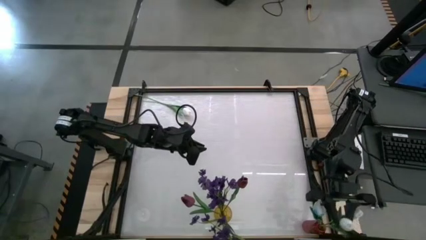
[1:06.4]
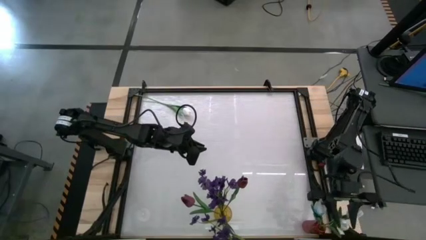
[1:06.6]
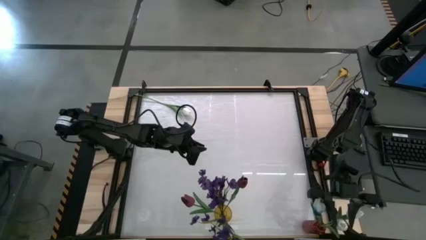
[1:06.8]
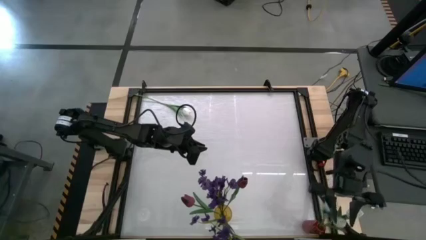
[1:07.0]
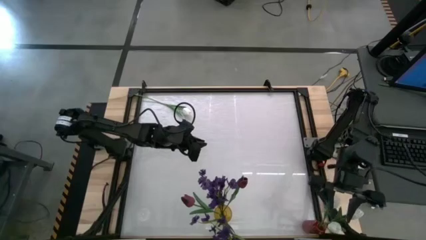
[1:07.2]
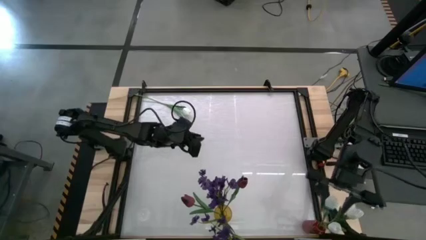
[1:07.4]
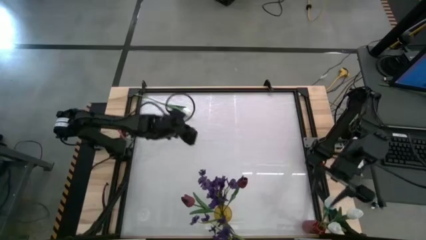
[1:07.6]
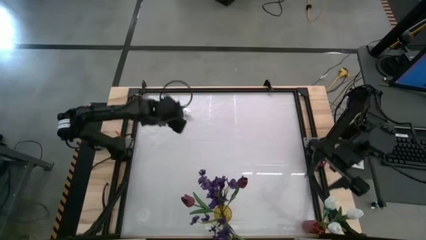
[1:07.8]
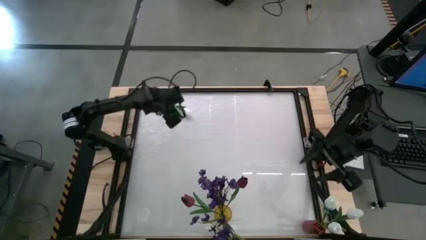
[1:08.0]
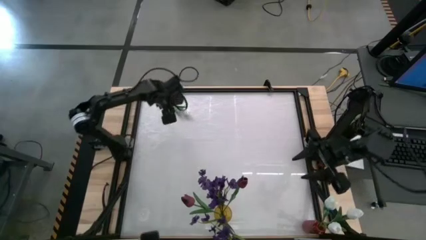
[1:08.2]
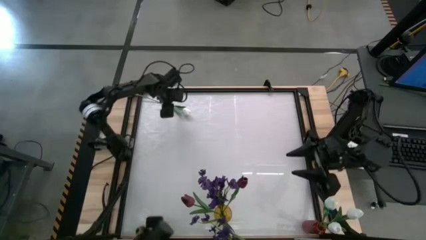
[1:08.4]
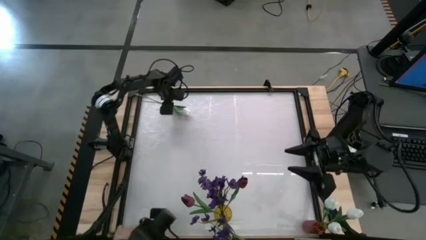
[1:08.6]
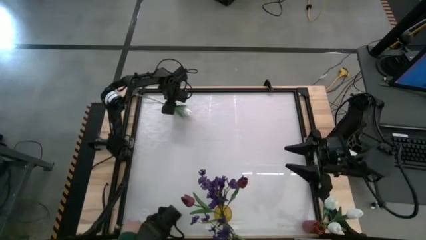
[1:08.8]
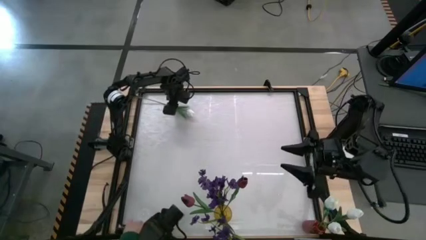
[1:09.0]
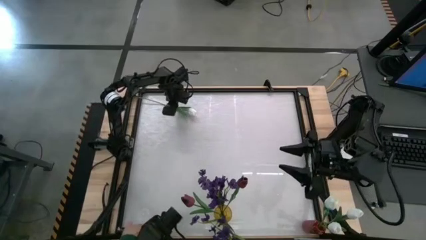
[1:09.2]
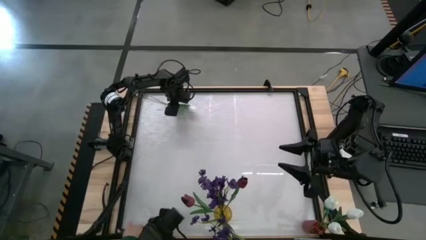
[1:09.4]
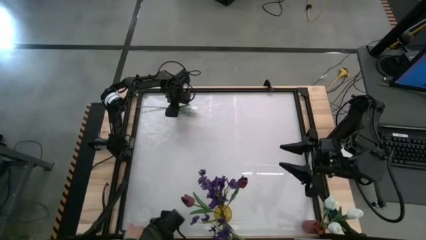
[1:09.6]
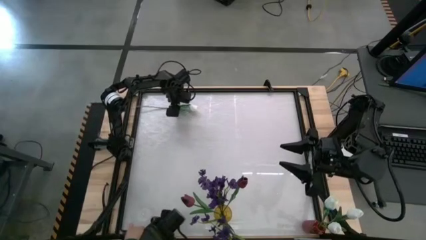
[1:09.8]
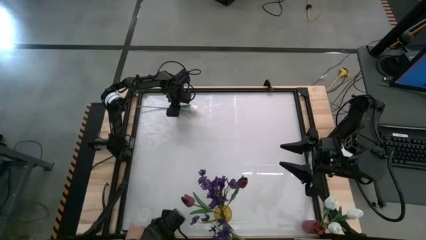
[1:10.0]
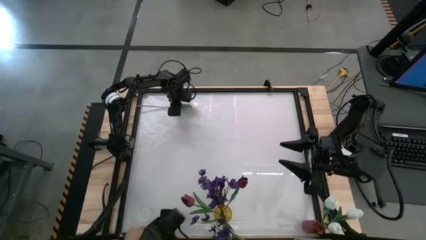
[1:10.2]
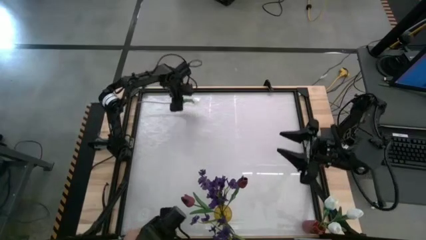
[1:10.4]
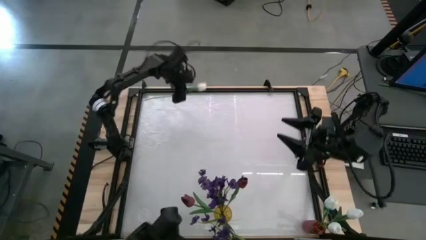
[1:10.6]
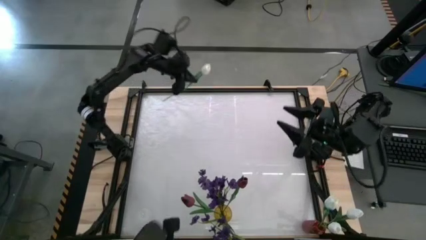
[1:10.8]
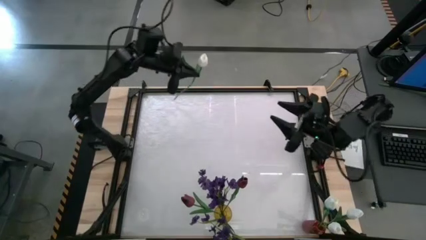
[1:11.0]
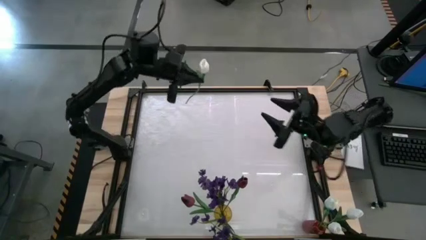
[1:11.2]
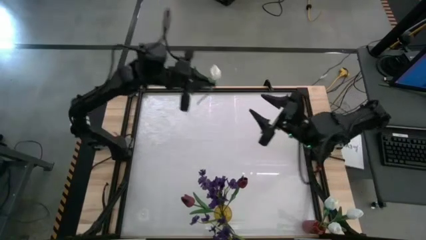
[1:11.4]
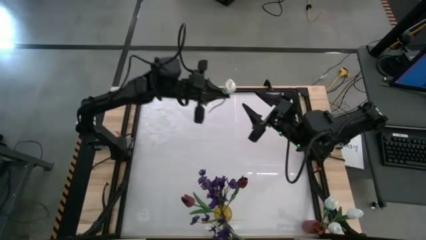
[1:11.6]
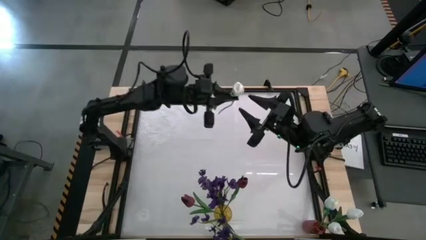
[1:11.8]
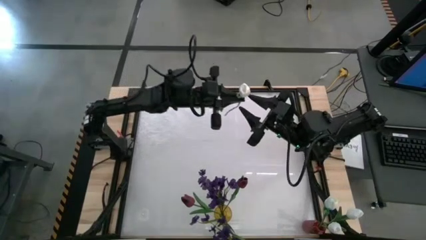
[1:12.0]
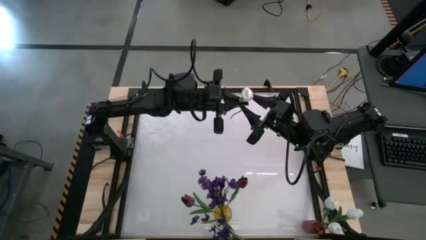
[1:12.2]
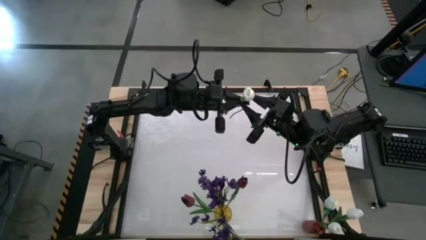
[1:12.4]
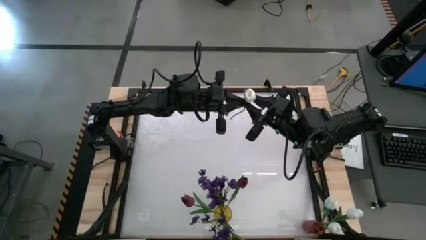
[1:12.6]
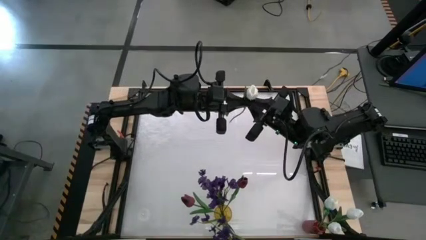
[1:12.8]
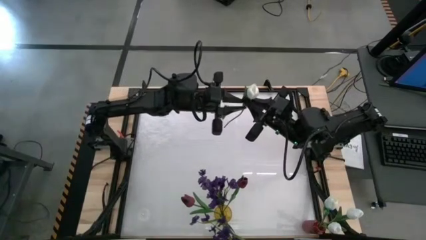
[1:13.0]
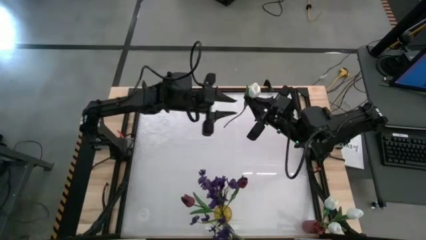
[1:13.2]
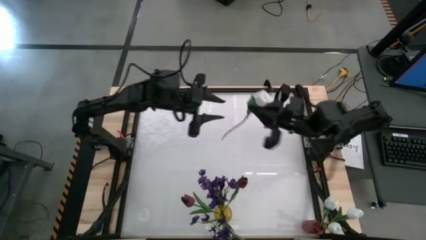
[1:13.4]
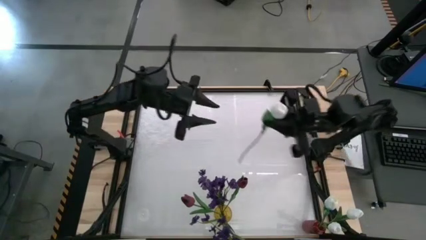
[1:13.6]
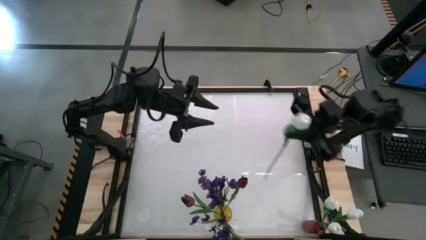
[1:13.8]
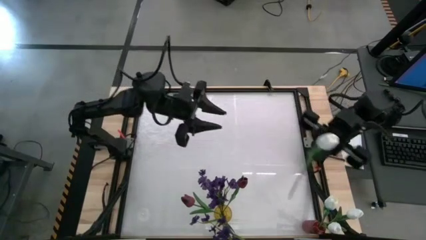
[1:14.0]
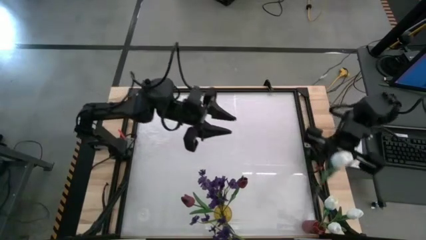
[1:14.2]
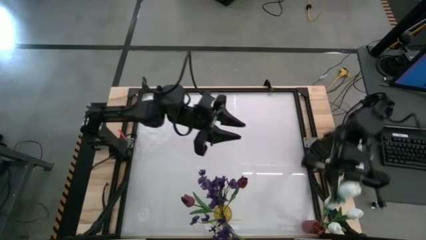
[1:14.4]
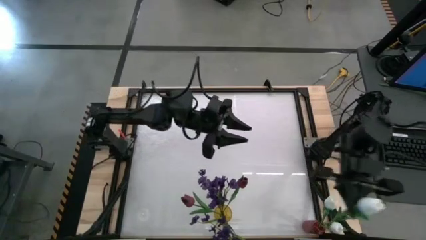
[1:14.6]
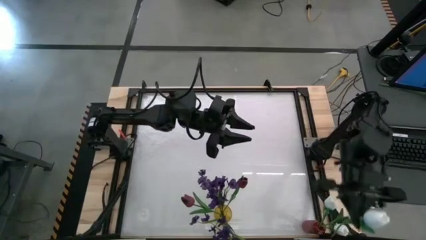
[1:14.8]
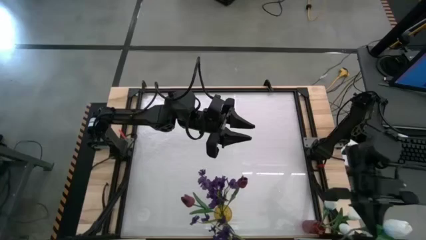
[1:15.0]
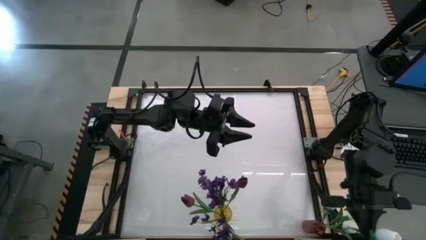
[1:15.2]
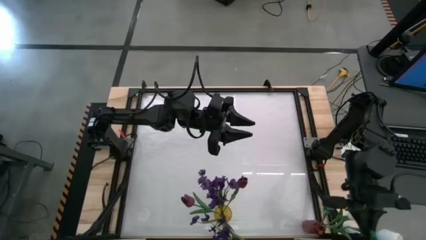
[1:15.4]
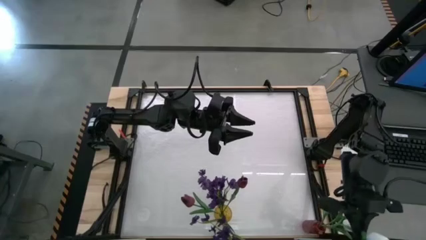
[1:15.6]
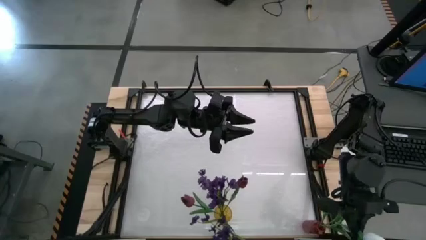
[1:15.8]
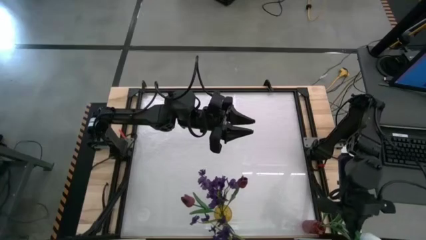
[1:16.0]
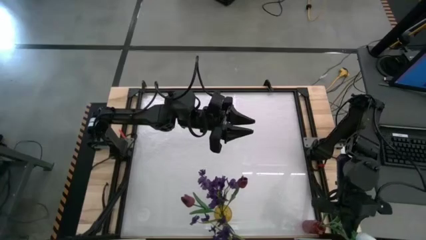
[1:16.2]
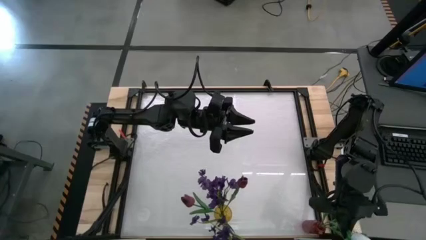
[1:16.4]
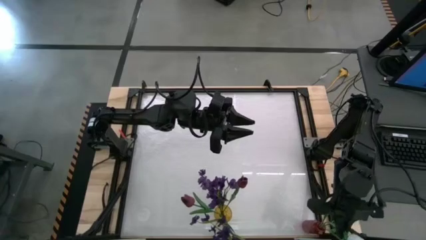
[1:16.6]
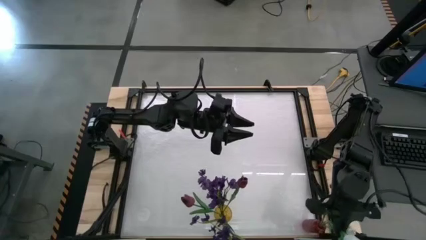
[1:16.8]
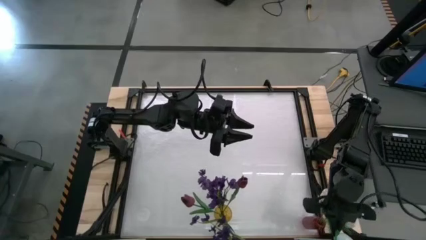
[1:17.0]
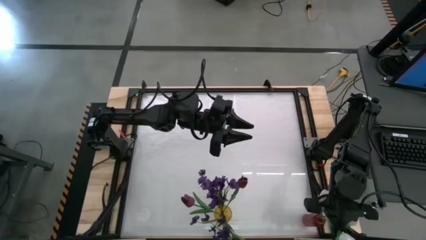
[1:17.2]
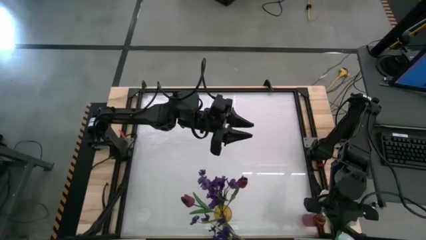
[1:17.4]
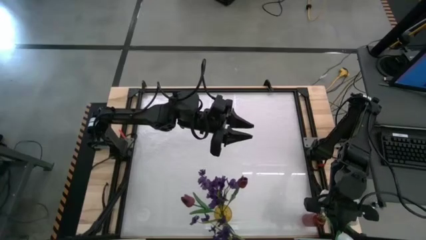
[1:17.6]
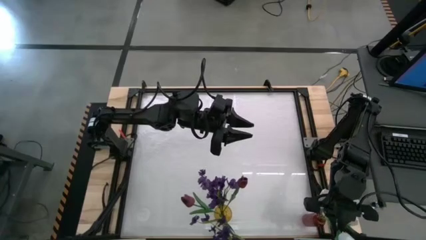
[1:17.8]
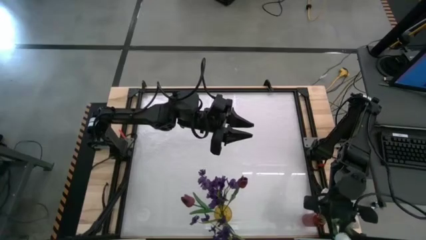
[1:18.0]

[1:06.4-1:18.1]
Task: Sort flowers into vase by color
Put the white flower into the red vase
